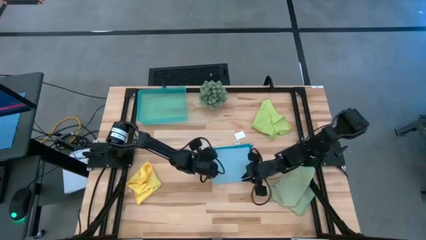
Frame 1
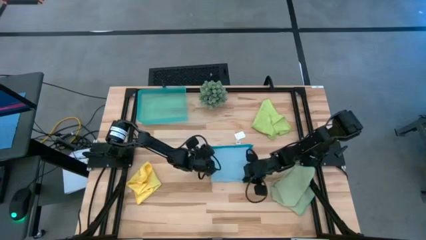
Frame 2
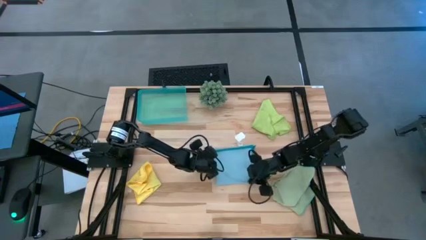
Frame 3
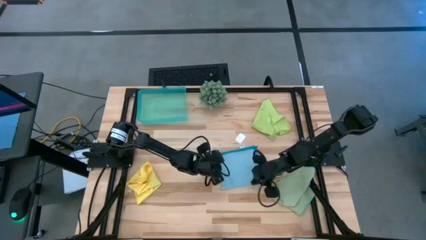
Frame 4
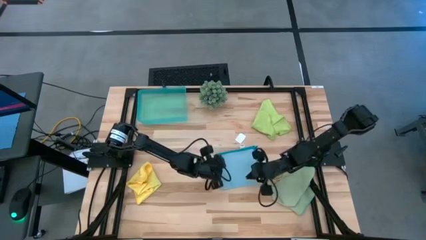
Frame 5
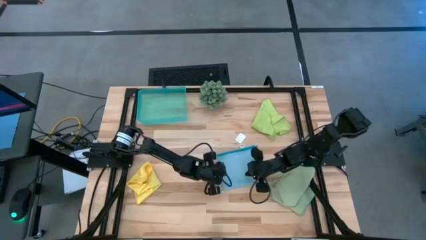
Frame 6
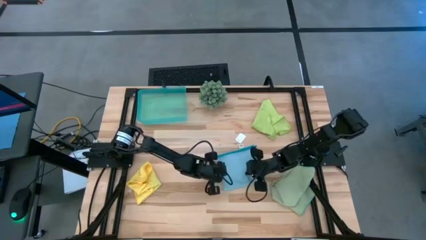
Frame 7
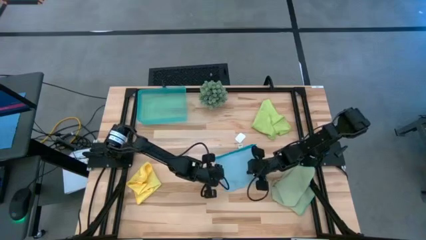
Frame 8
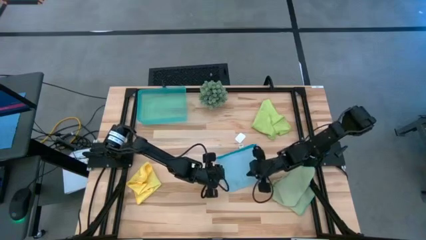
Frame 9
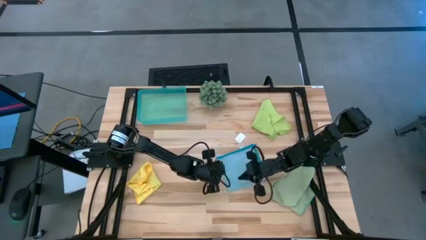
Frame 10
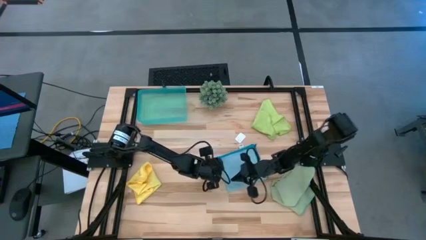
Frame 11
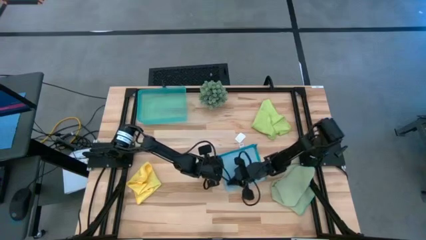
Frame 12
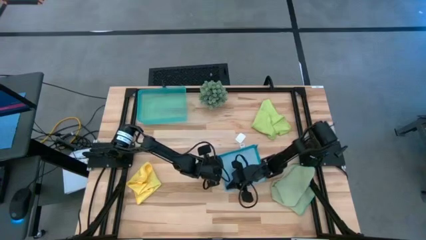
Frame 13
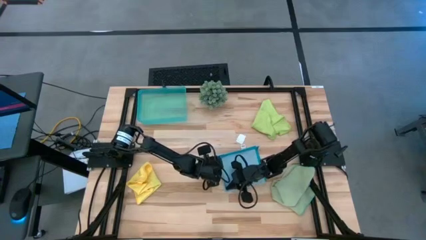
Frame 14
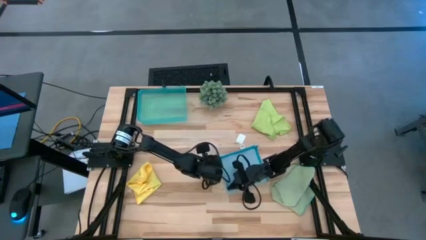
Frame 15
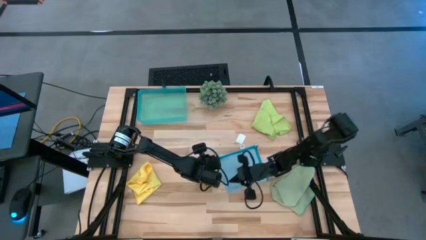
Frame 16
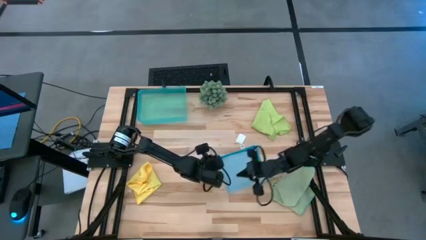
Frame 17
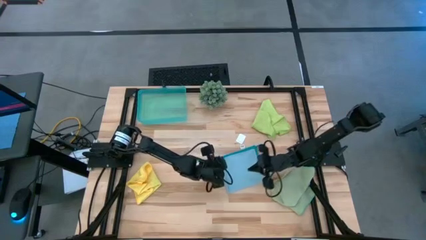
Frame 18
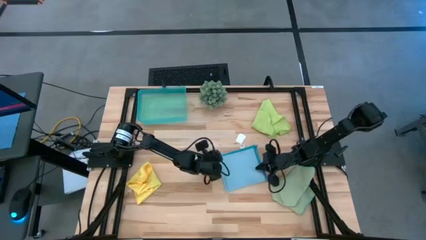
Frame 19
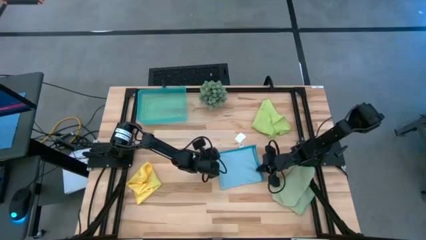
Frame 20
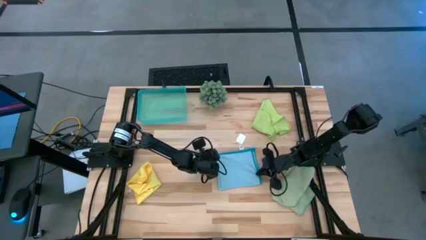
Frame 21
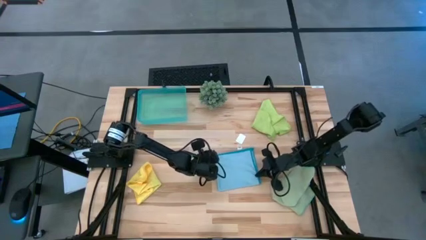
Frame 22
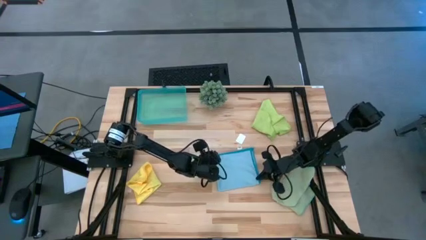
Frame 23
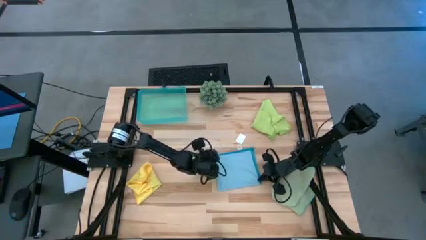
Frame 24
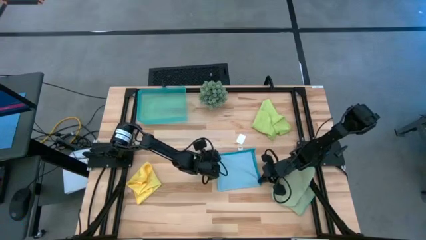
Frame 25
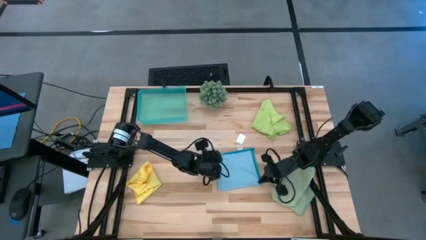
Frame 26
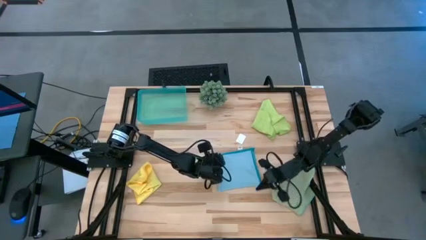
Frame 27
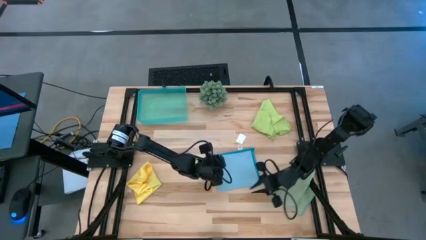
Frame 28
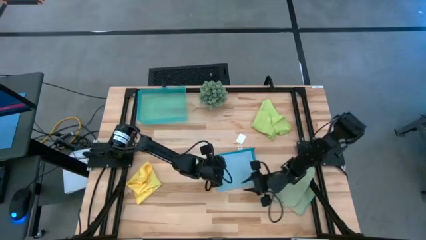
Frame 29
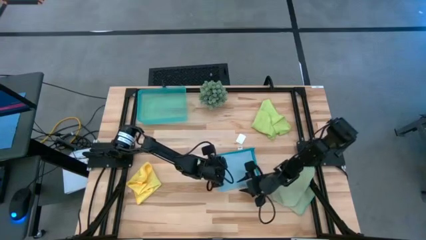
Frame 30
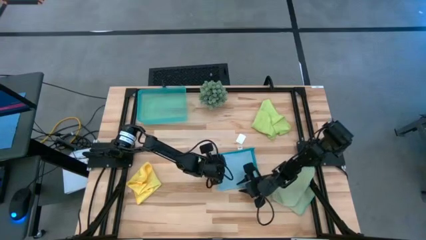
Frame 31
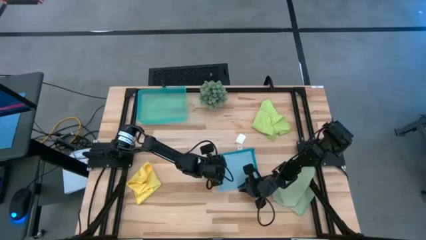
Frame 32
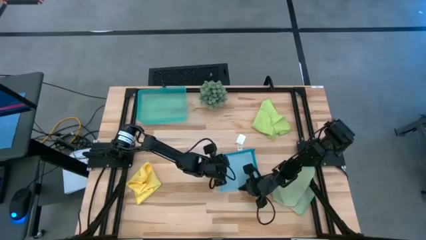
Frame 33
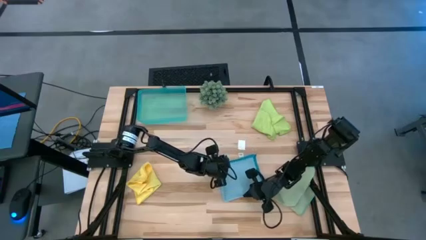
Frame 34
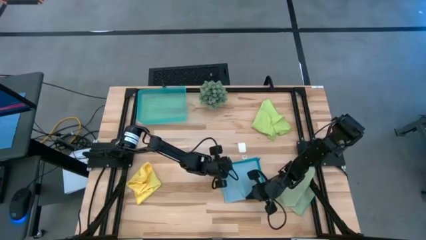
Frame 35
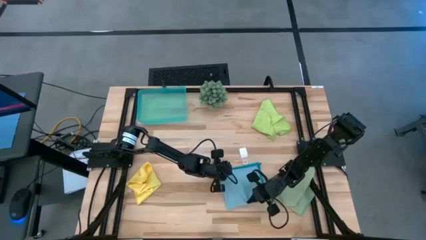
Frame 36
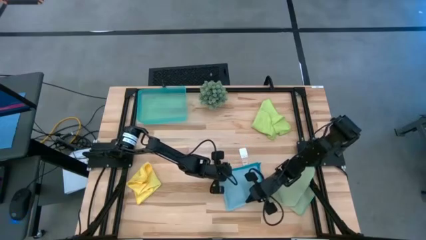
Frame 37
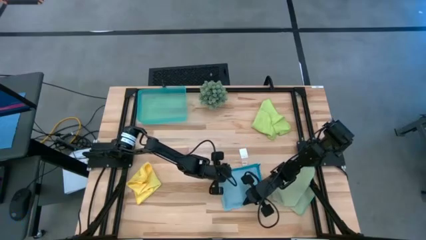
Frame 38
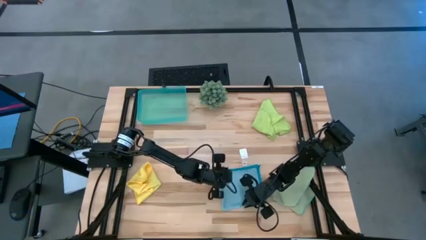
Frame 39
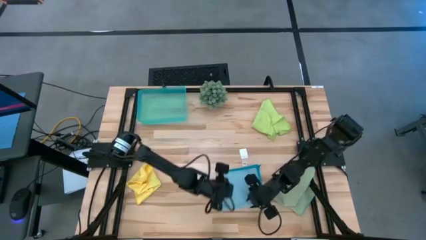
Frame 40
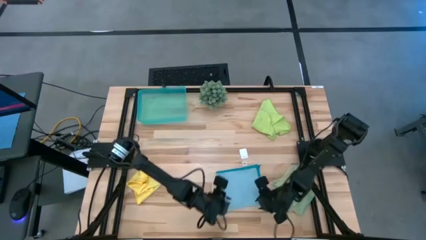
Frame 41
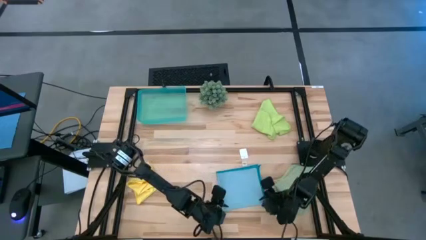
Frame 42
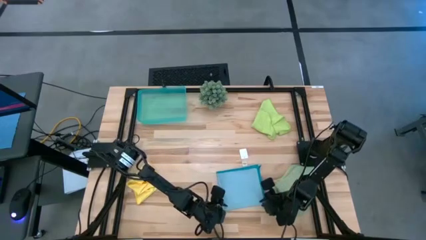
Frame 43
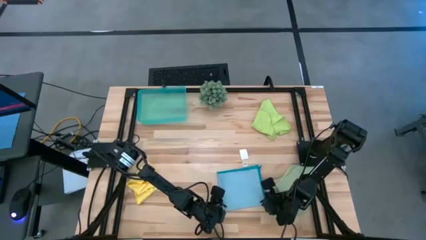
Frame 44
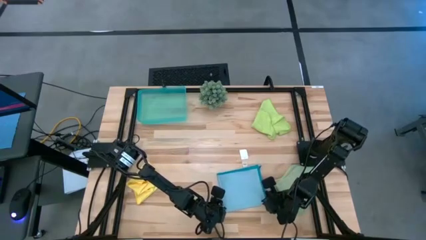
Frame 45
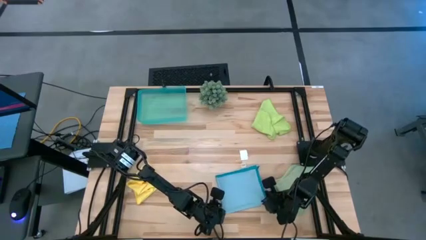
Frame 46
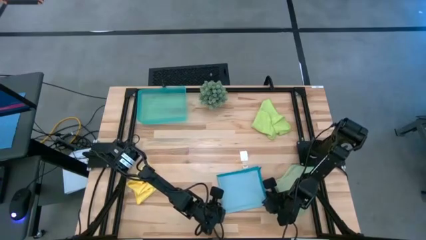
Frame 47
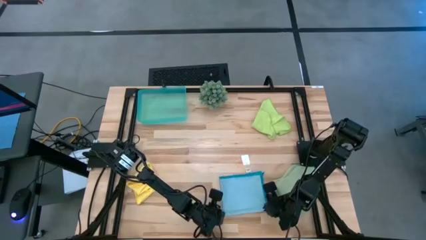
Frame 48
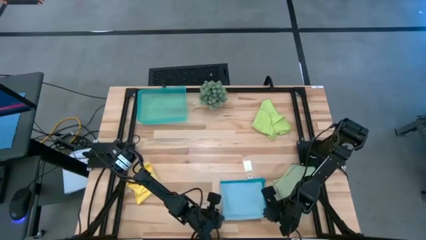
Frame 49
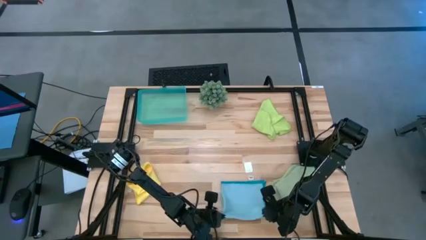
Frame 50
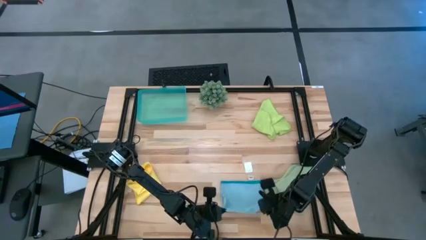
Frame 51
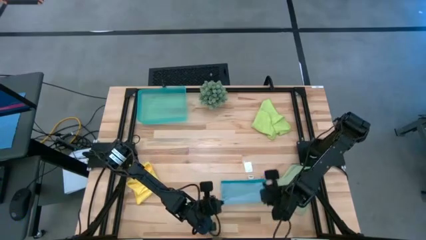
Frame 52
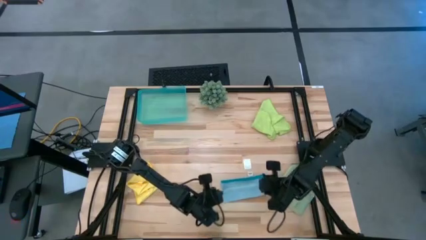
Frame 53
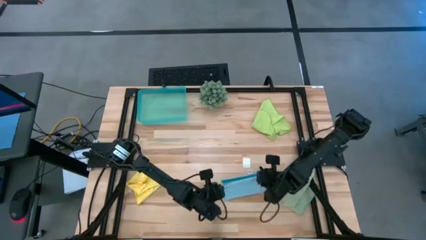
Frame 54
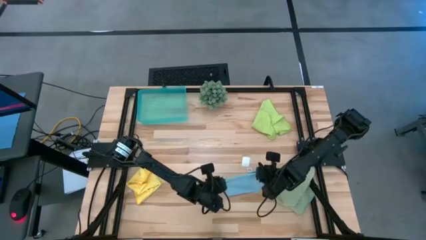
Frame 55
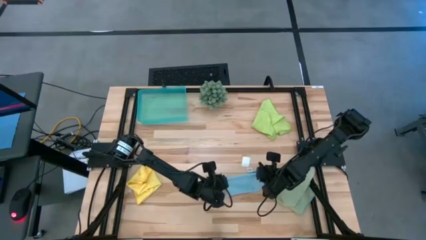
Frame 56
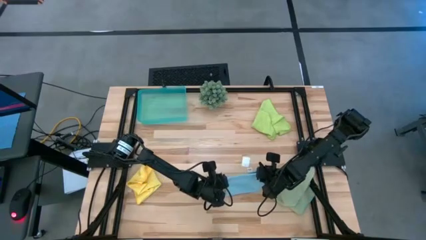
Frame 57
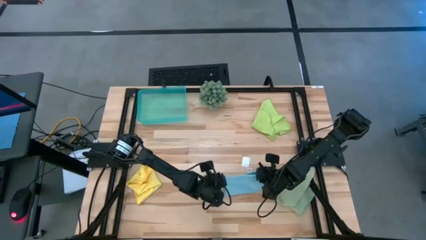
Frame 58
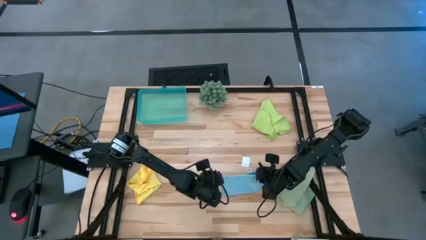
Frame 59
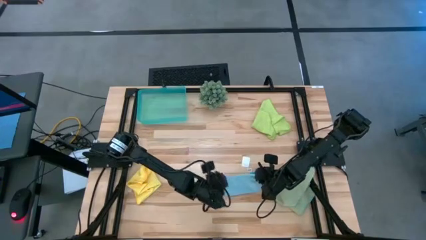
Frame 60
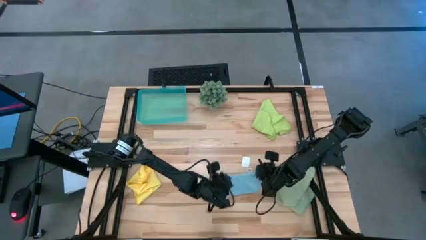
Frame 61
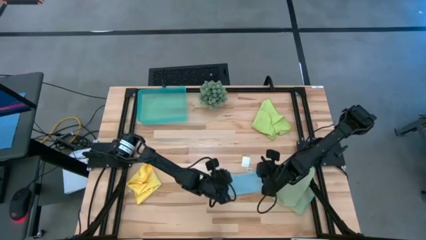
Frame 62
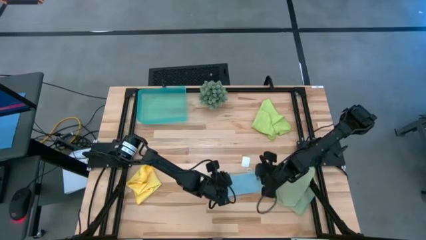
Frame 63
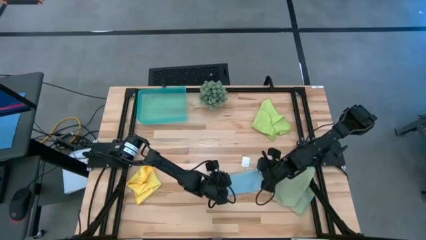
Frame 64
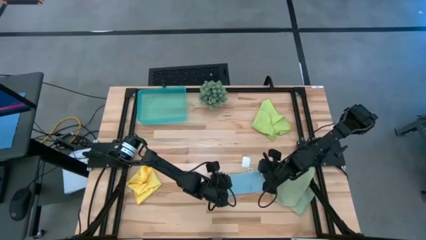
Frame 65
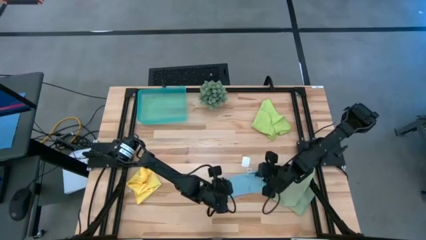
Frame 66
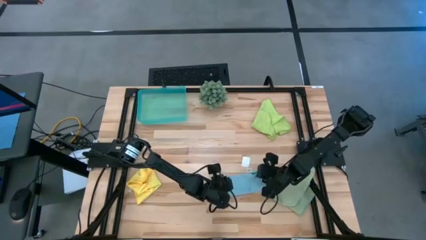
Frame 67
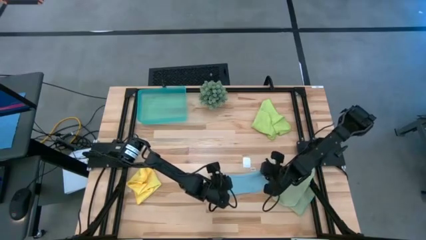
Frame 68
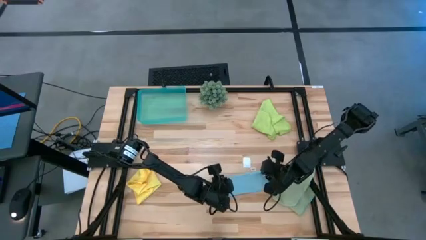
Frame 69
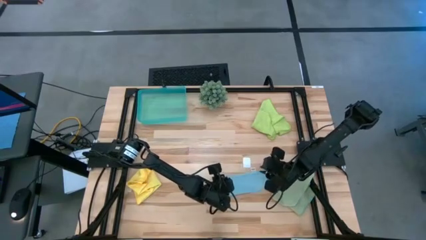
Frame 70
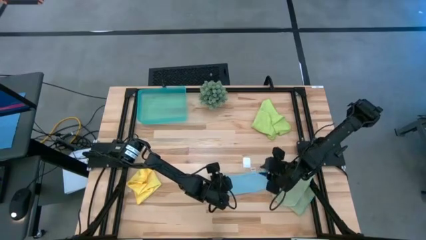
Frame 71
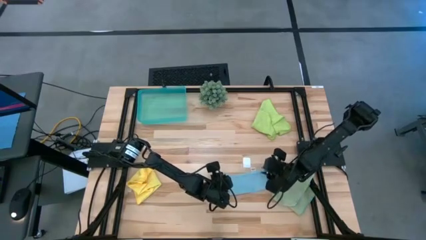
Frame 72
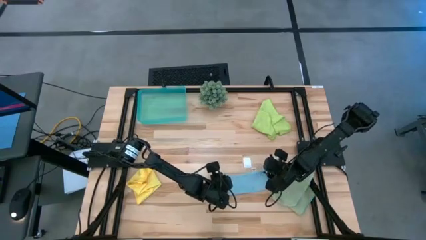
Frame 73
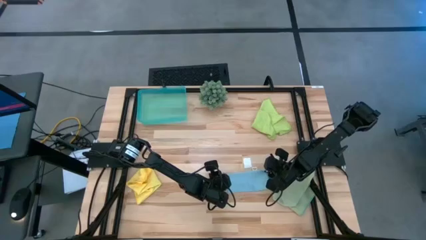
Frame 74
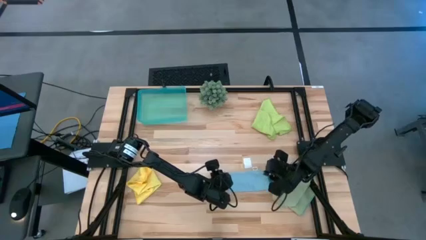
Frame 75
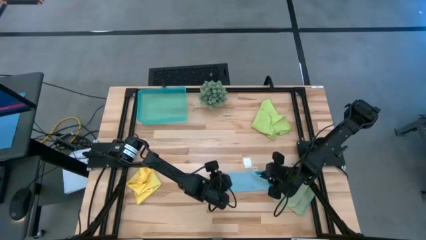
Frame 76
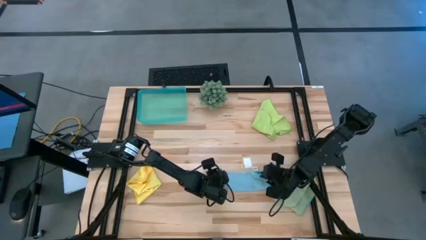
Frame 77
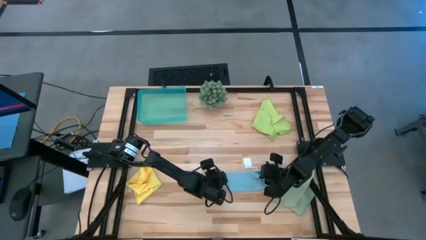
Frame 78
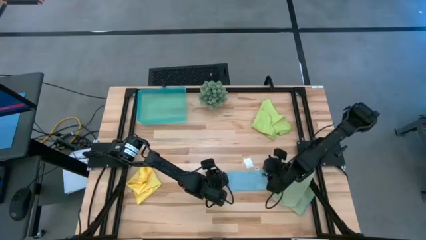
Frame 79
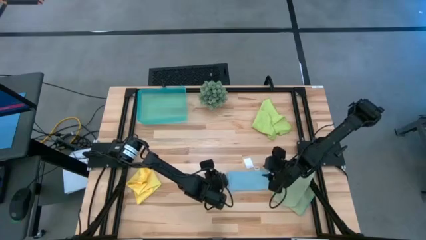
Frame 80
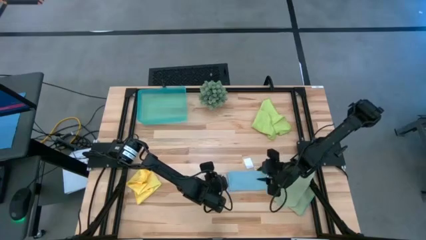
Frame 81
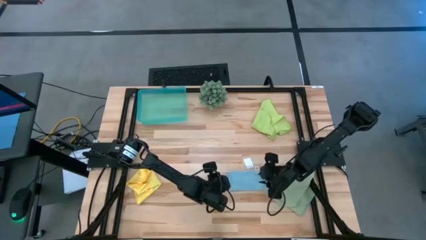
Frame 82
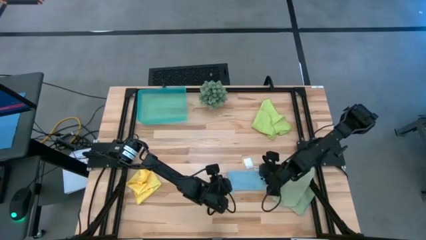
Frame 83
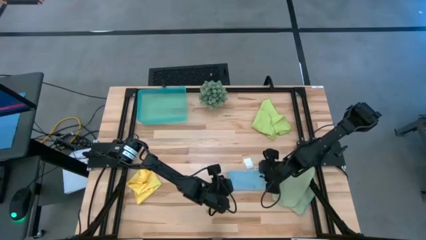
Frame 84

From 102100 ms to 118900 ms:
Task: Fold microfiber towels
Fold the blue microfiber cloth
